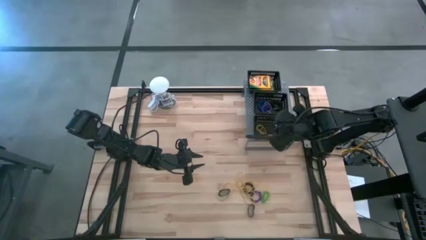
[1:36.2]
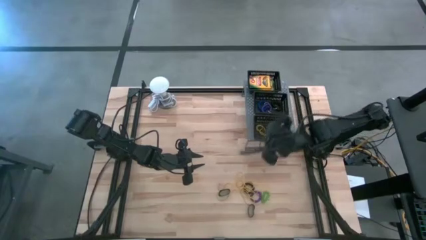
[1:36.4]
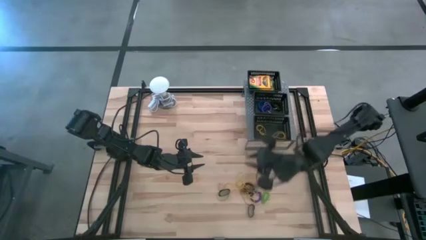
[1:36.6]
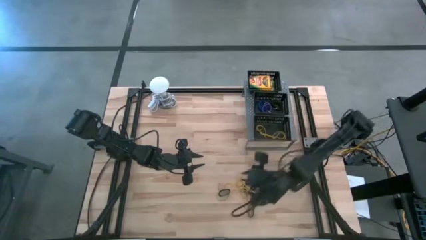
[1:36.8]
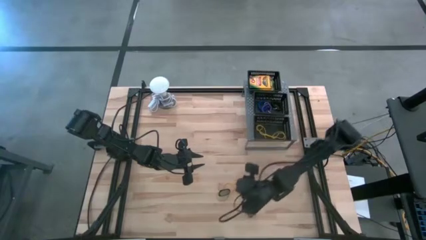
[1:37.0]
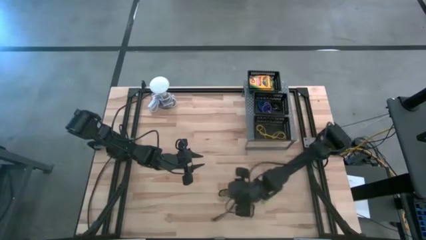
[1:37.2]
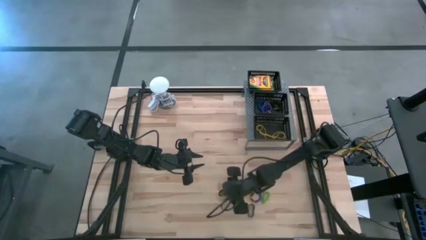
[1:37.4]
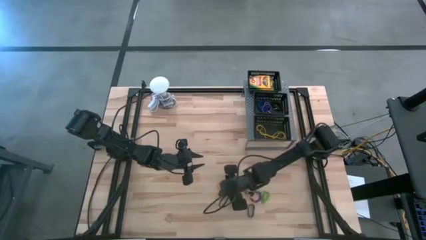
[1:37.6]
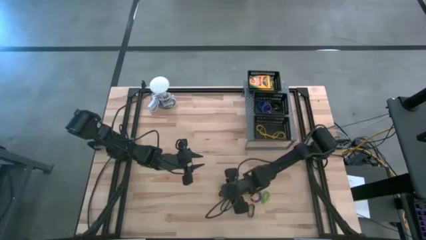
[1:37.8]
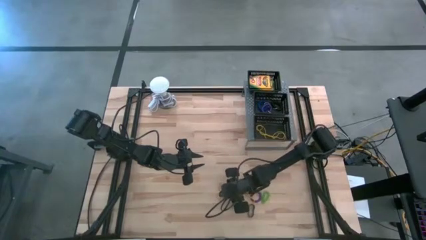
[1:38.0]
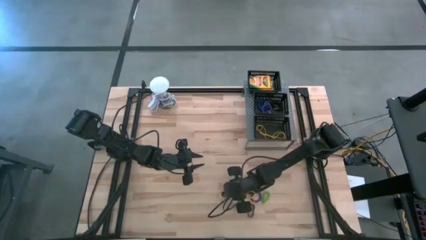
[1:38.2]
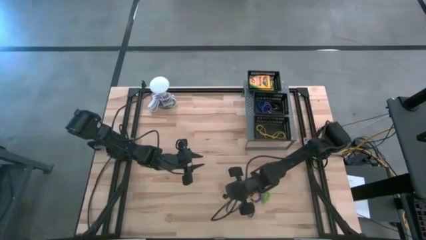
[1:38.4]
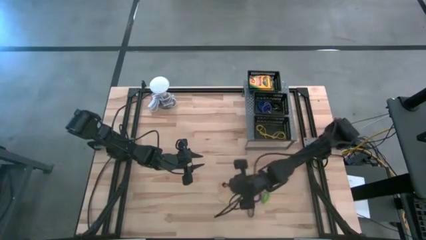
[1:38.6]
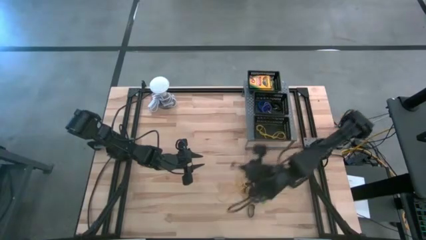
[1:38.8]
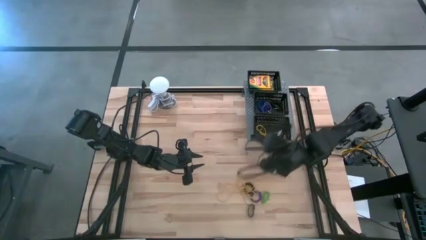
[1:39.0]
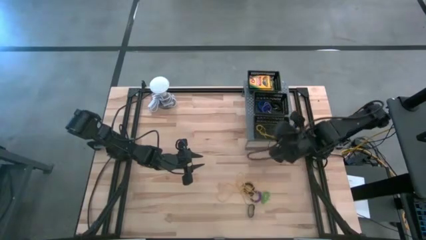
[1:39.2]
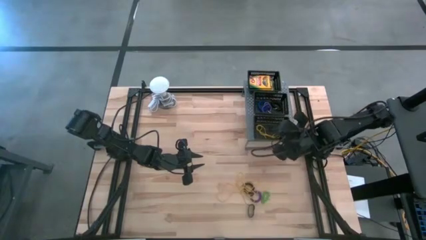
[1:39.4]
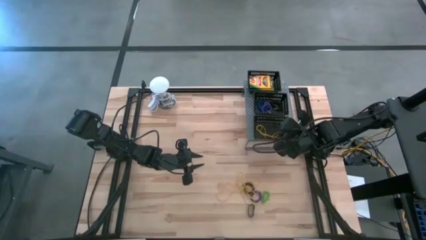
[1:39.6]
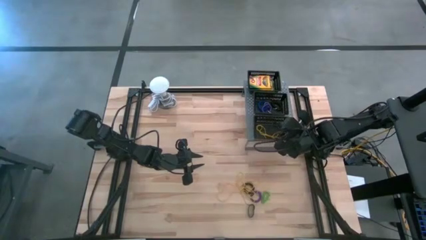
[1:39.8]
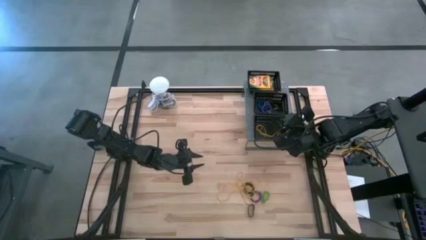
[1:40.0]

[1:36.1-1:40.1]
Task: Pick & Place Office Desk Supplies
Put the black rubber band into the bottom black bin on the shelf

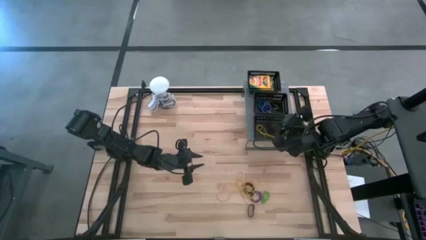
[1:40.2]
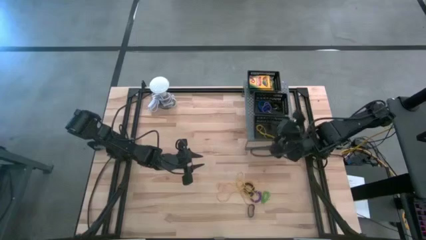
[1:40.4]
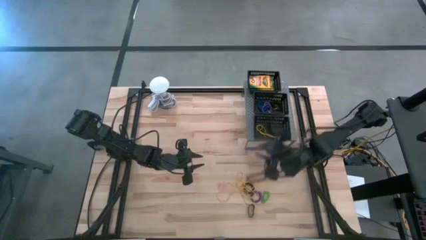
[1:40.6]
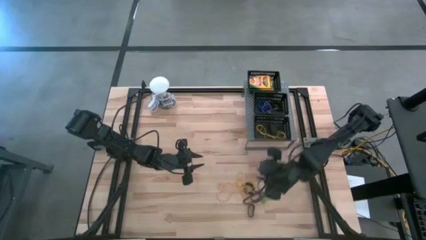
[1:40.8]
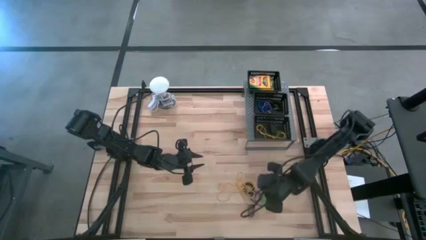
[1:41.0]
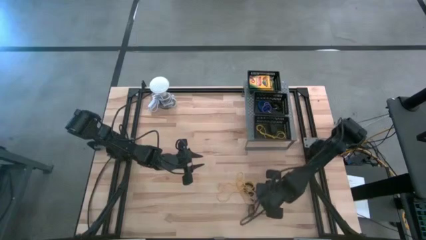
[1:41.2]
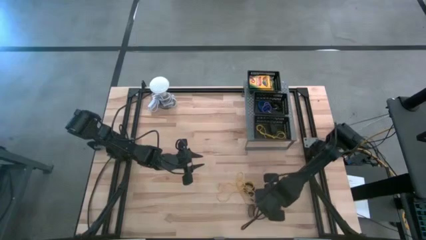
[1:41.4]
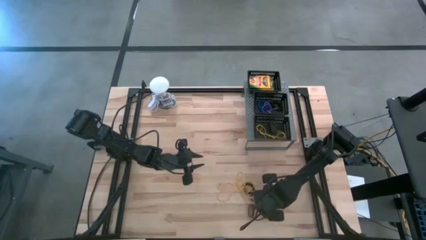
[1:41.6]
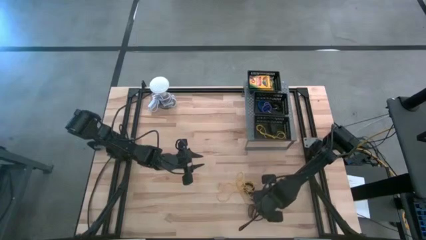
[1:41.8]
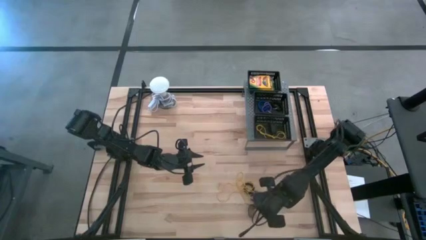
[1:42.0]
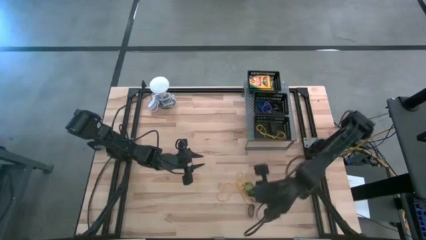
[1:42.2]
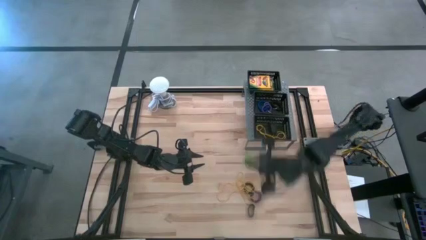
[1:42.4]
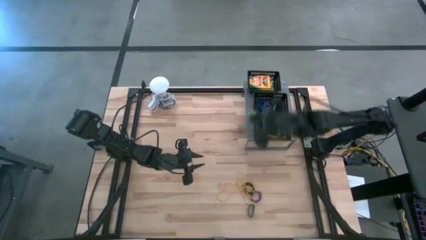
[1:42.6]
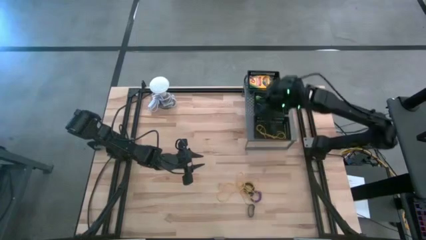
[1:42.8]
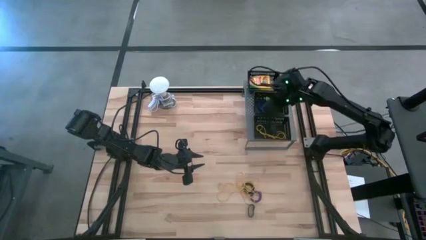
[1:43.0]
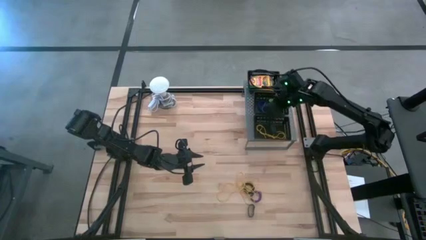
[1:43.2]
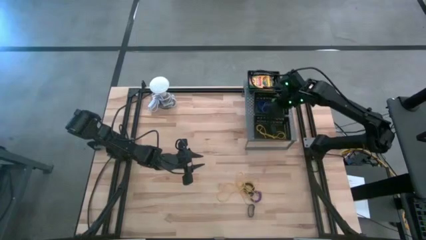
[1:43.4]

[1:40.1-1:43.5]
Put the green spring keychain into the middle black bin on the shelf

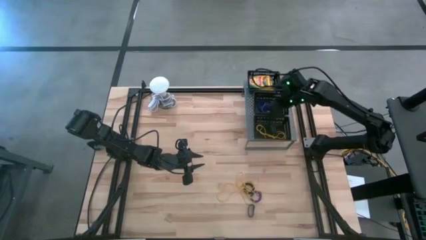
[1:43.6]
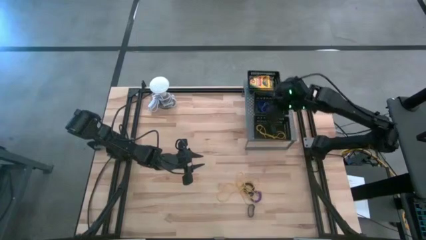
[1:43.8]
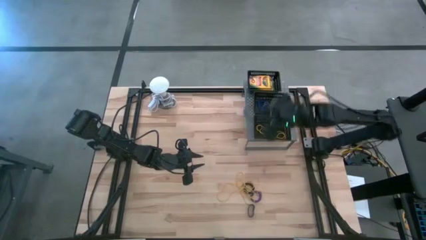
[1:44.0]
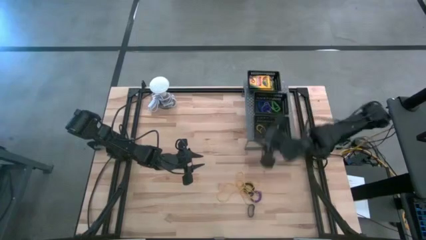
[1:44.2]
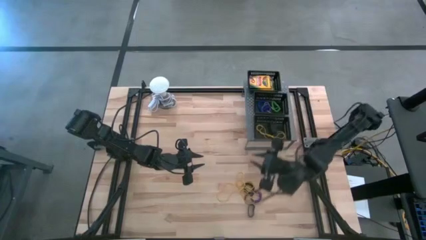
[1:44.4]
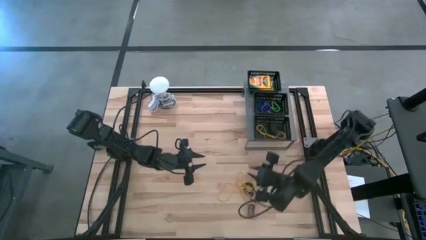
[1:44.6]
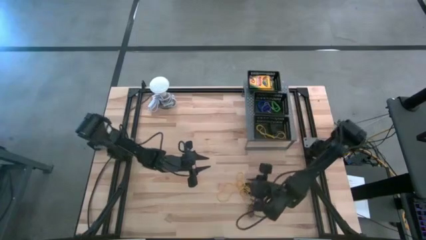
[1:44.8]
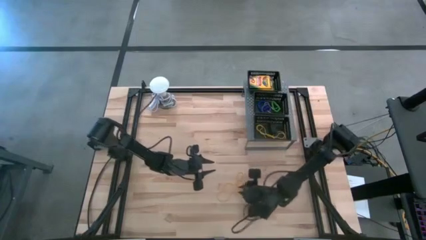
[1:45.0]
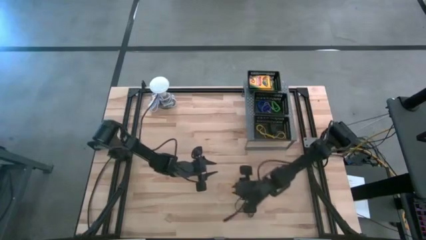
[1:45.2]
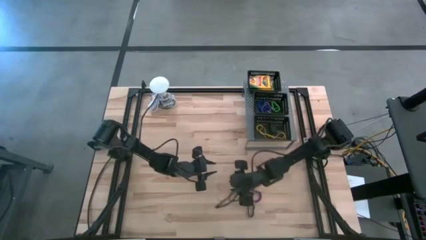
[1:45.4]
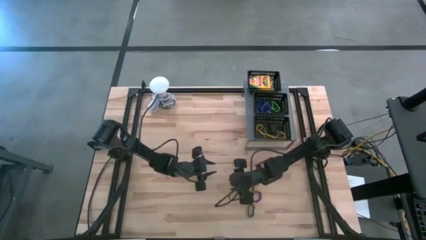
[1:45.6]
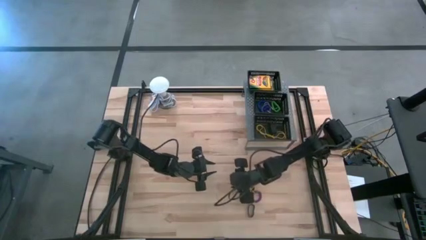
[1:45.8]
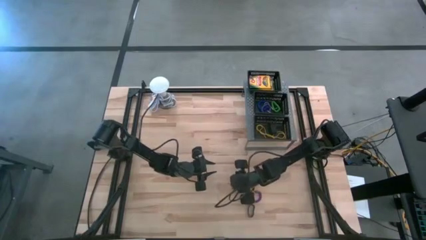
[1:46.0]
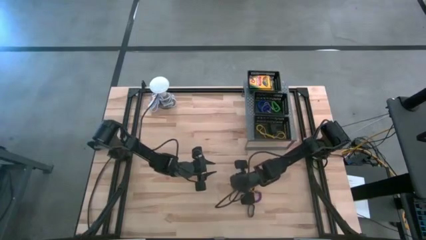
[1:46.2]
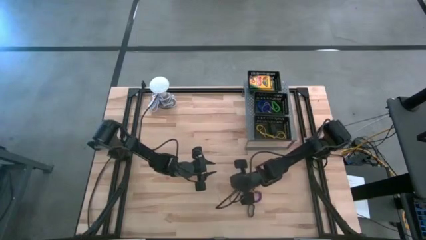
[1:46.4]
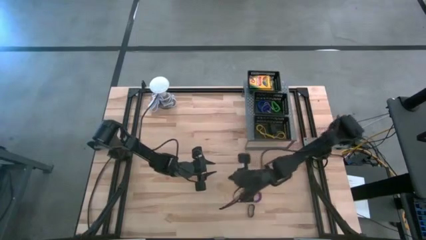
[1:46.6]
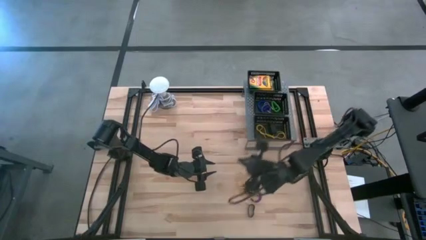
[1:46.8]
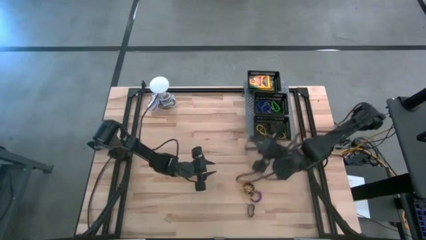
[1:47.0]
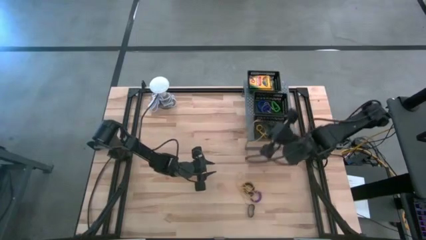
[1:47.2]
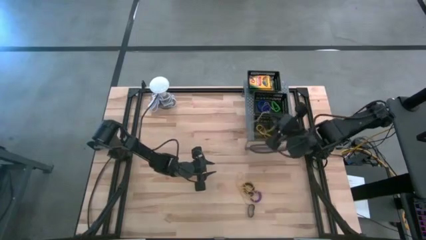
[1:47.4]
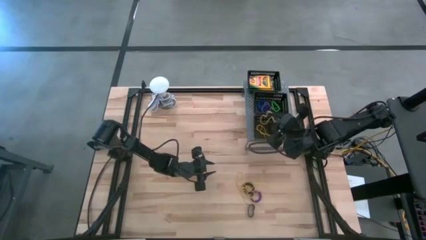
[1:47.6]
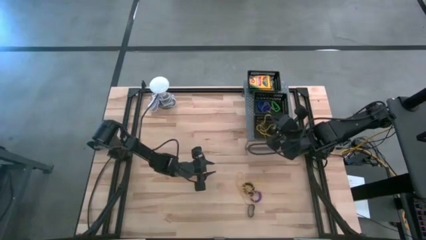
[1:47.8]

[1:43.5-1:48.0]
Put the yellow rubber band into the bottom black bin on the shelf

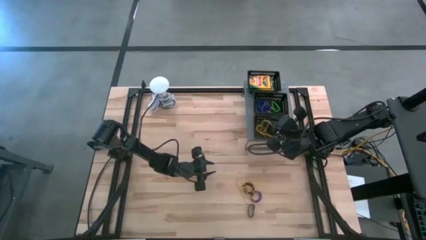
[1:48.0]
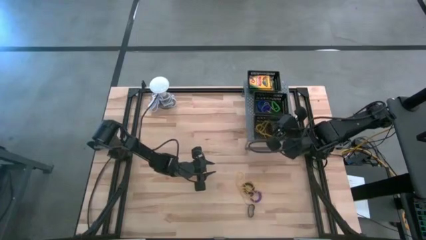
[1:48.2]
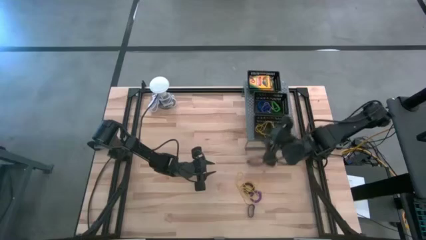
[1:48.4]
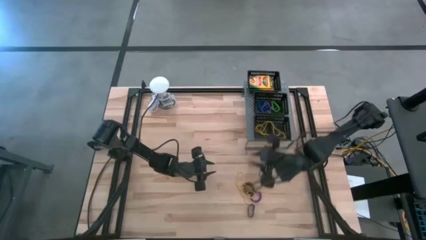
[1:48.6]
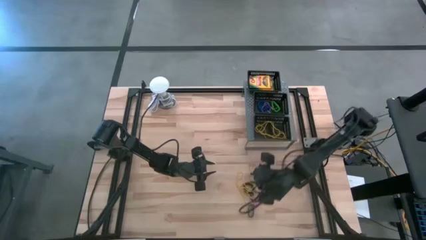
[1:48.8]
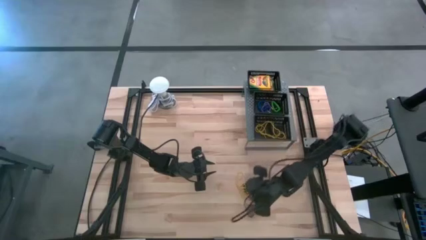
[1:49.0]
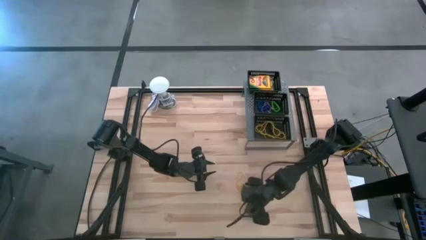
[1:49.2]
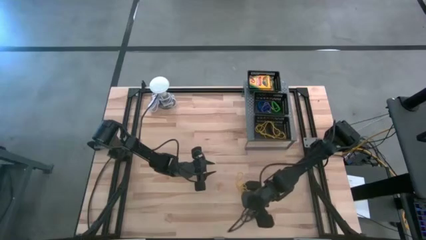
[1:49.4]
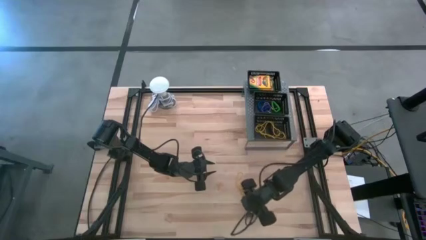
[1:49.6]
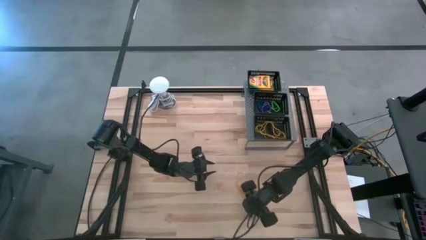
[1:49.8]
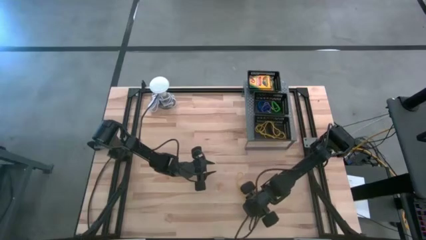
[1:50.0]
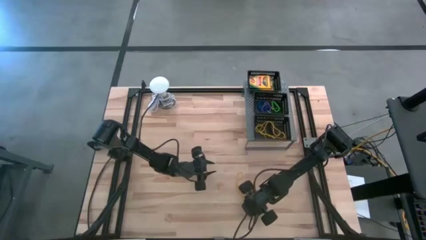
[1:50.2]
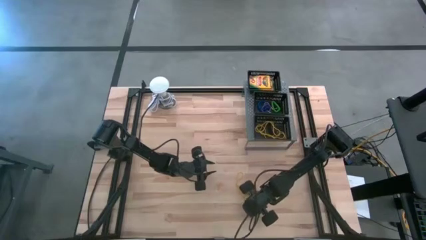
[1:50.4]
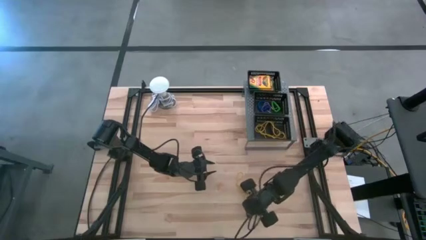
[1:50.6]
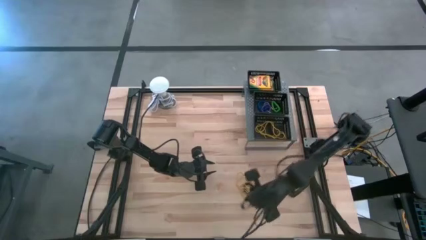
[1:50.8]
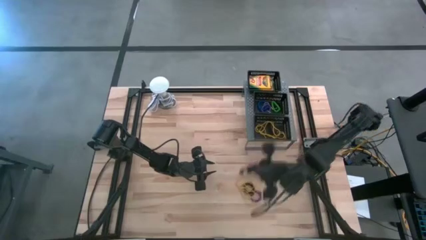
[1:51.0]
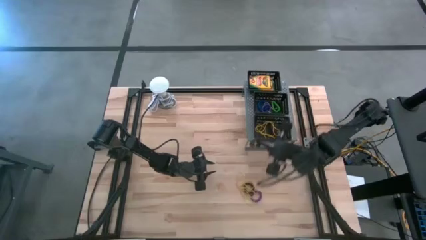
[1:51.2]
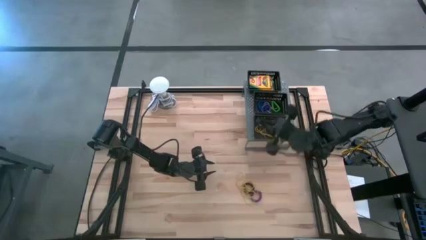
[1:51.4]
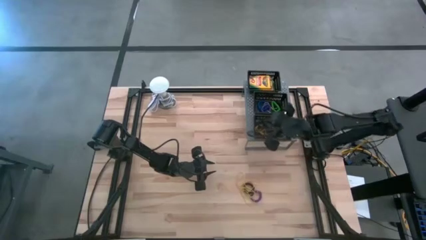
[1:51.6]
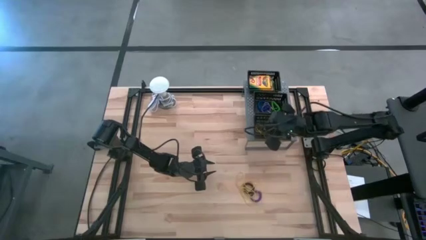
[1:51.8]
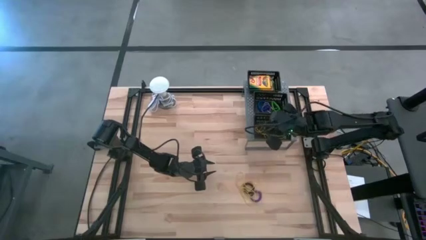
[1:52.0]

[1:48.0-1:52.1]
Put the black rubber band into the bottom black bin on the shelf
